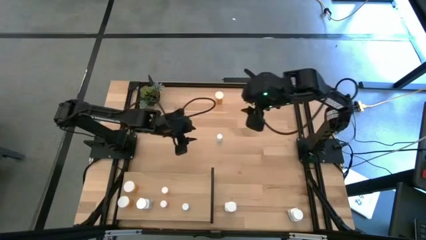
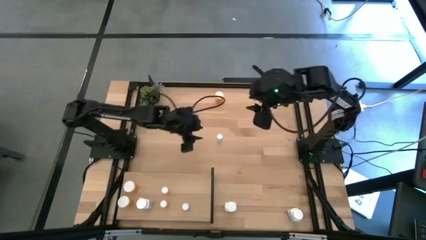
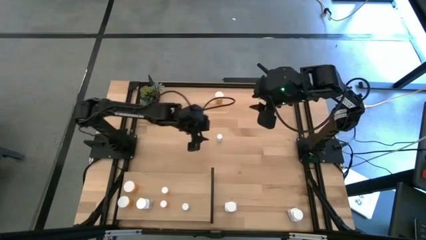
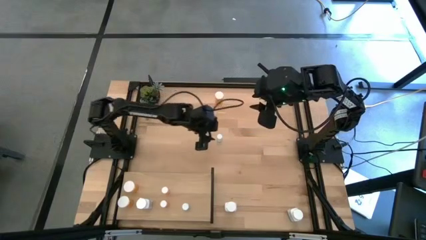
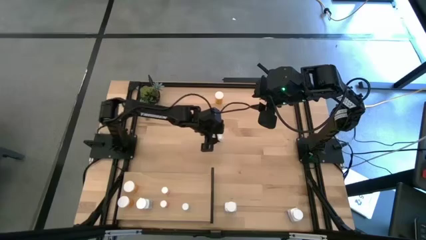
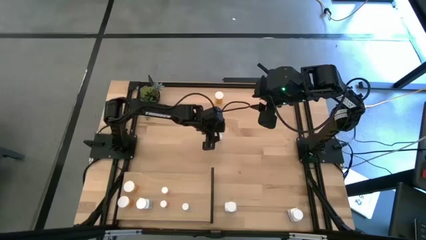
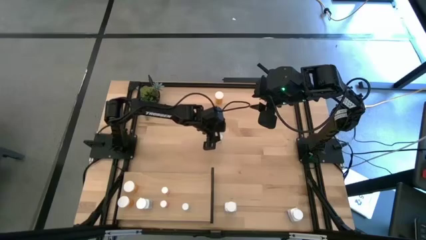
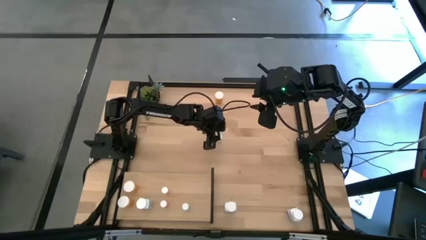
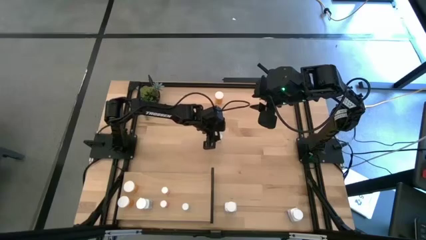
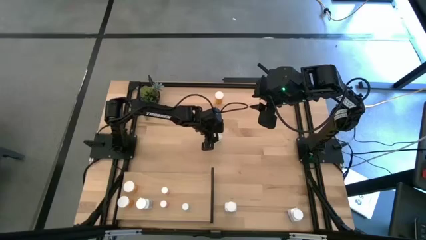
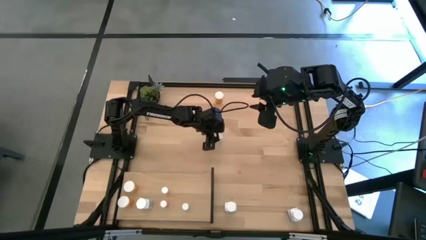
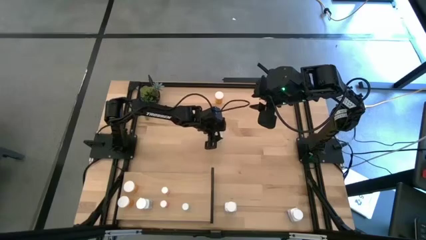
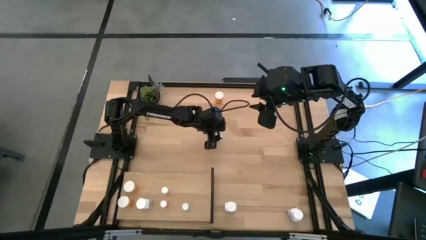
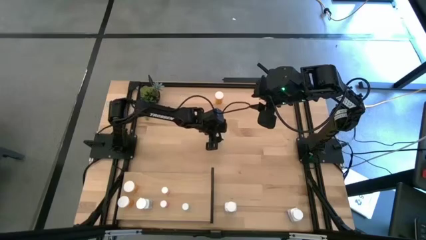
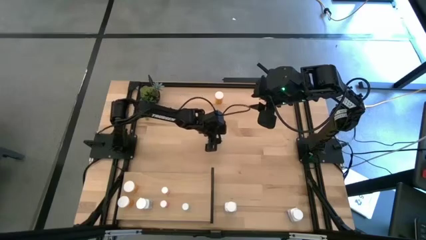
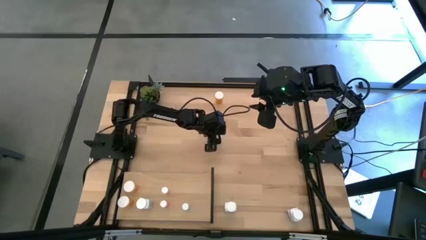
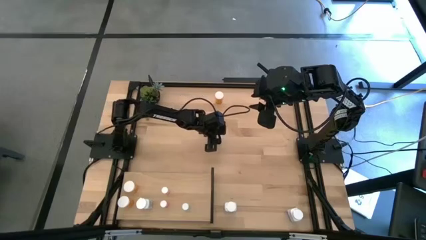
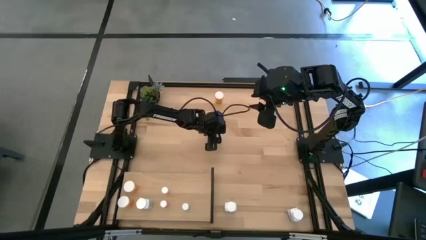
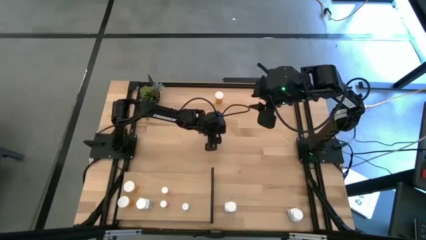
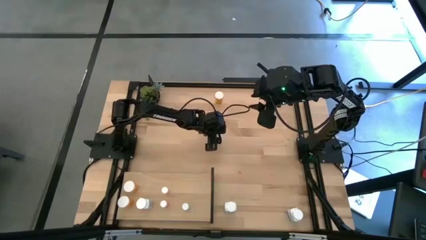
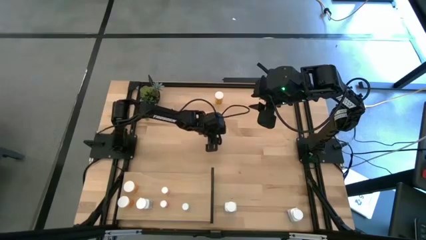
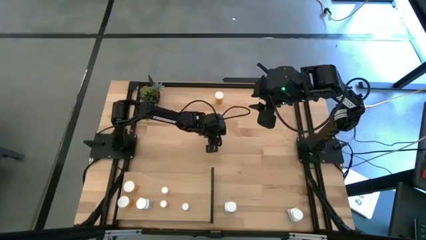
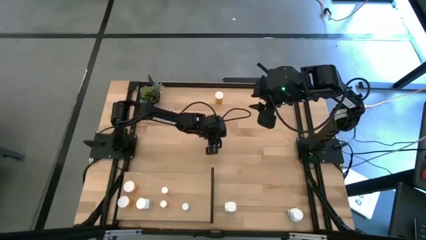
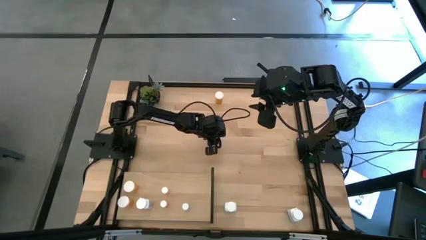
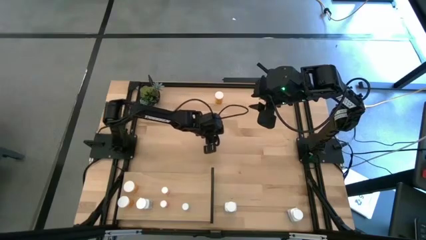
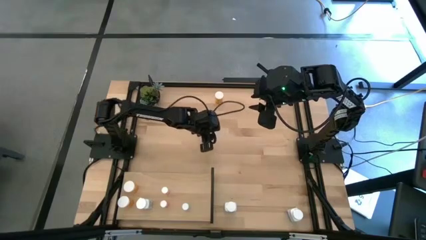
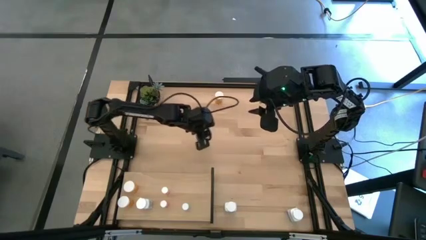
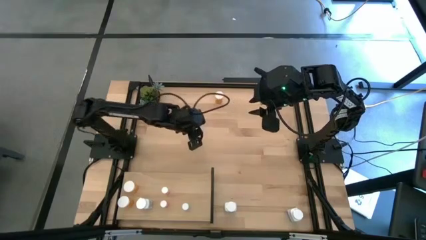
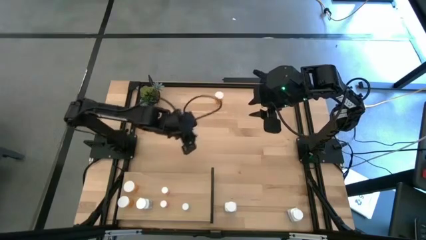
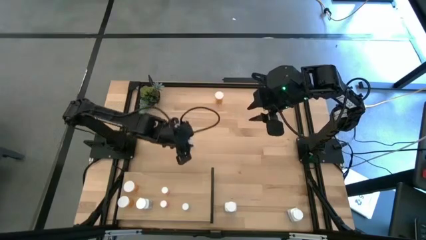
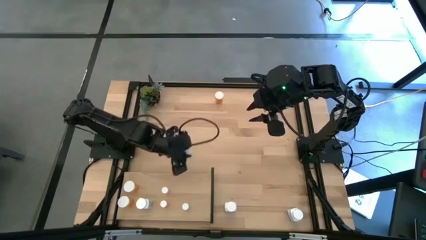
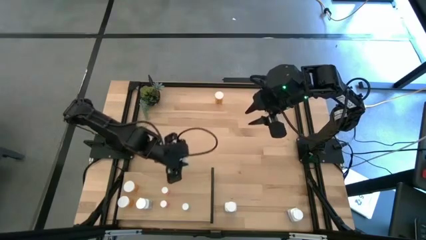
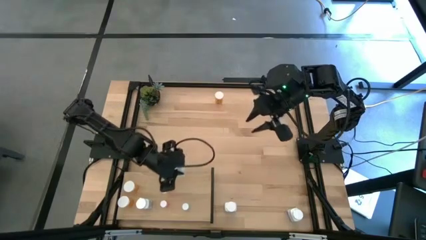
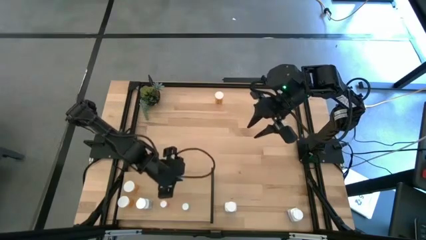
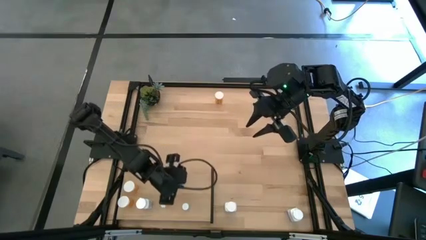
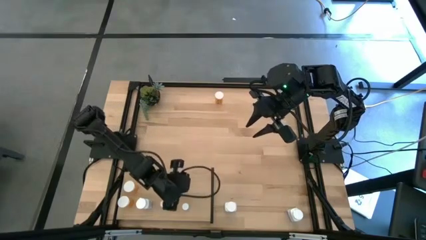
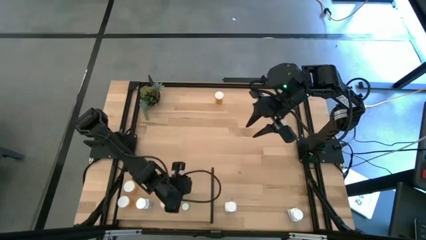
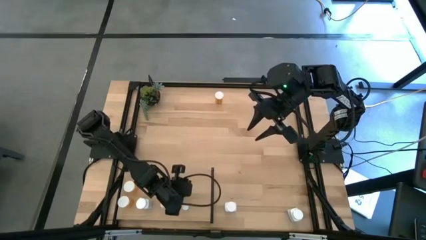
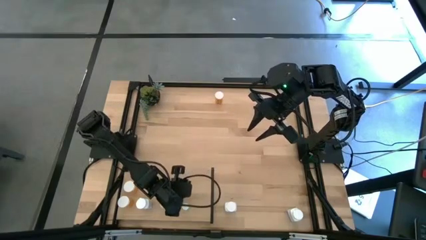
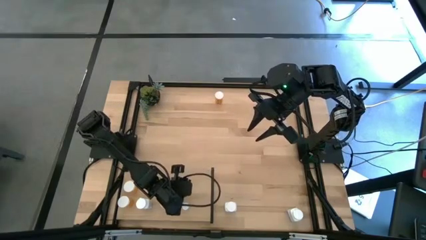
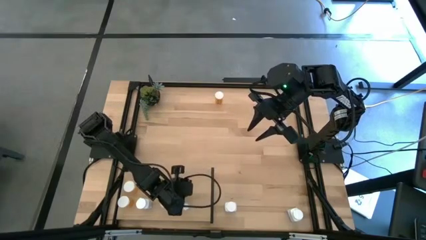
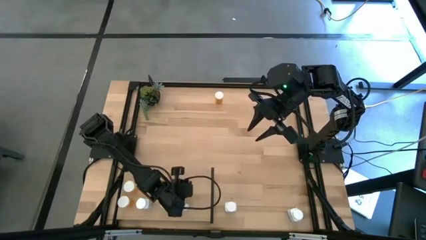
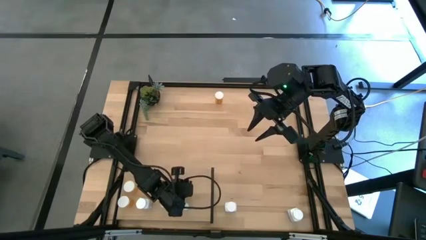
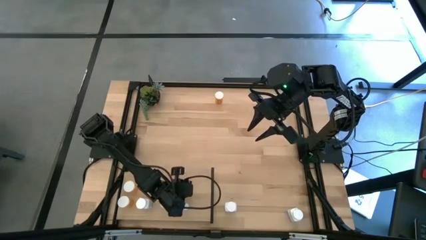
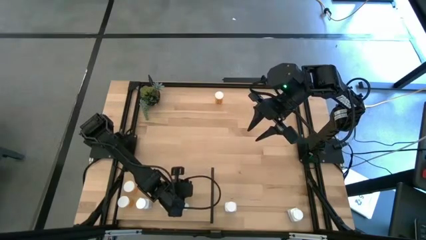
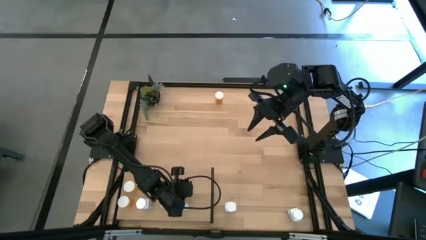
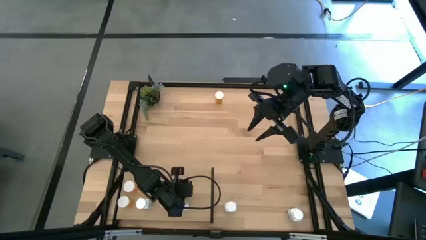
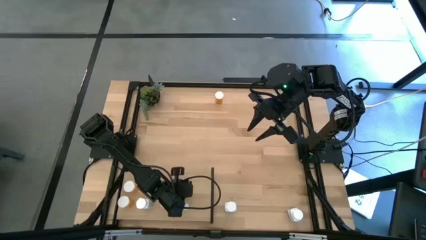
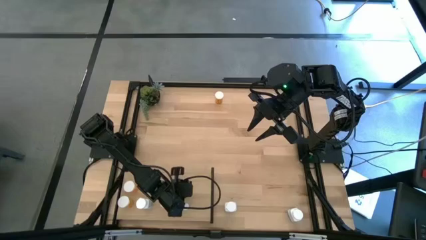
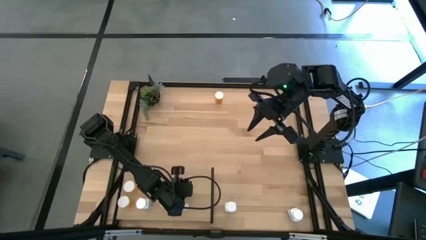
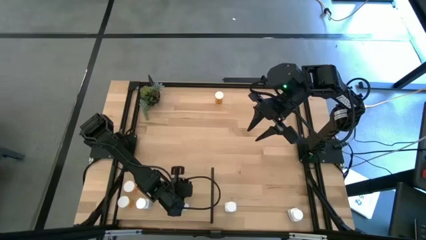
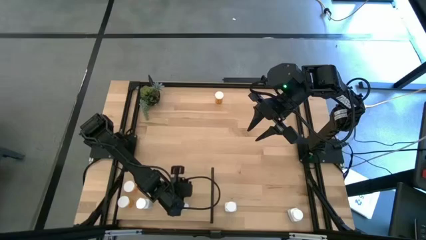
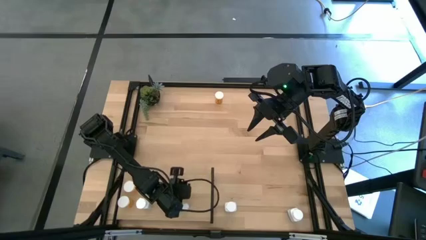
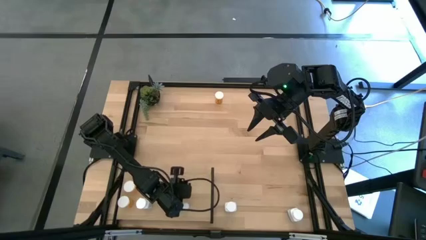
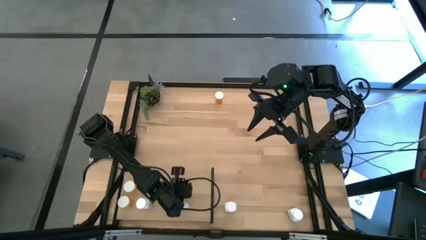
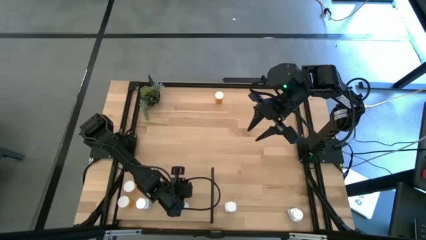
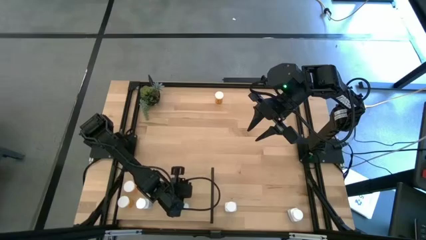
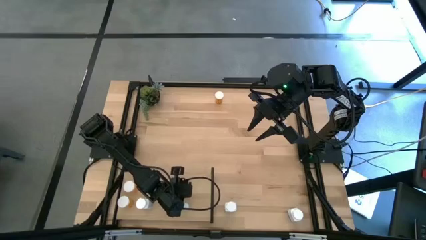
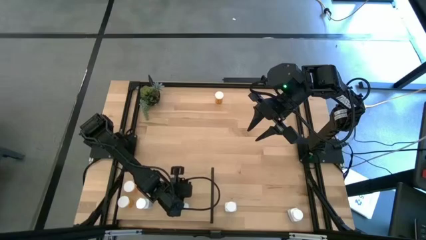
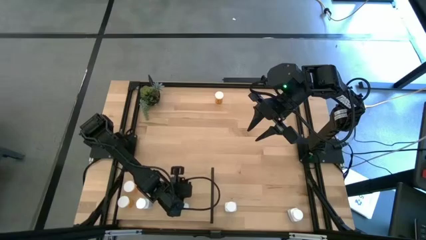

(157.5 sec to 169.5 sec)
Task: Pick and place medicine bottles onto shelf by color
Put the bottom small blue pill bottle on the shelf aligned with the other small blue pill bottle
